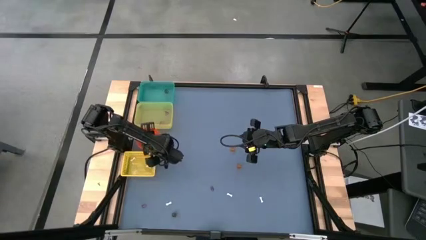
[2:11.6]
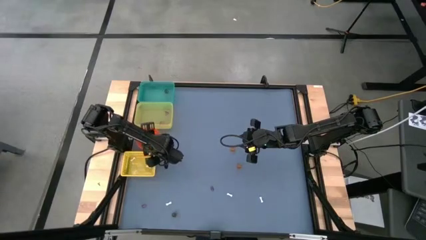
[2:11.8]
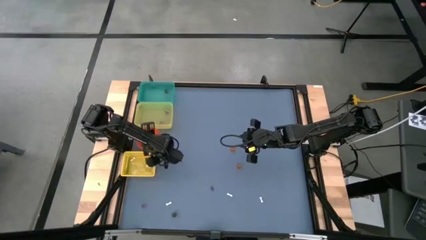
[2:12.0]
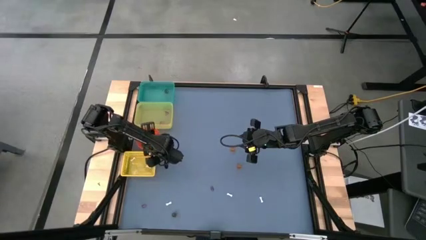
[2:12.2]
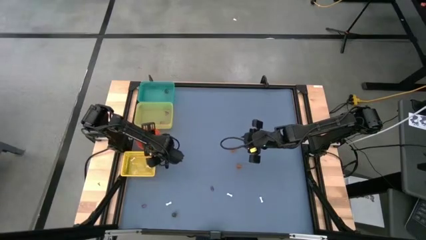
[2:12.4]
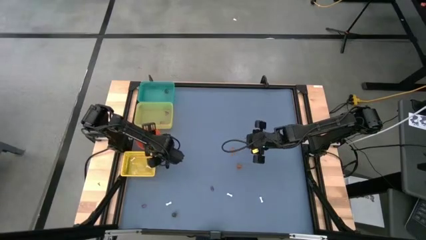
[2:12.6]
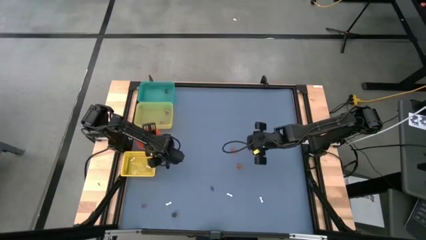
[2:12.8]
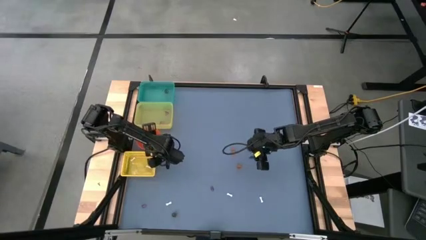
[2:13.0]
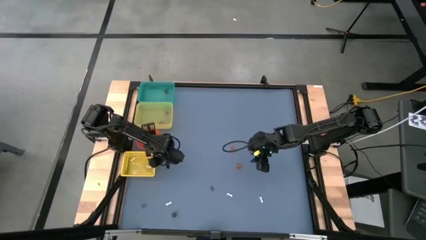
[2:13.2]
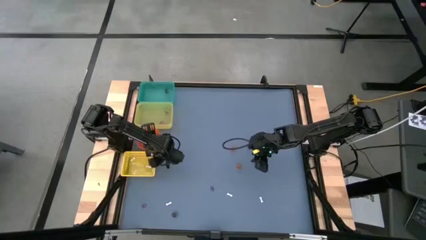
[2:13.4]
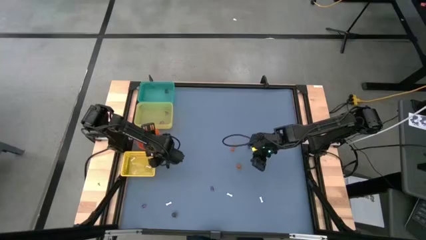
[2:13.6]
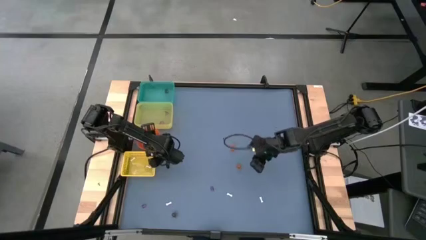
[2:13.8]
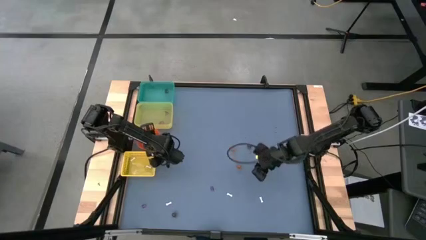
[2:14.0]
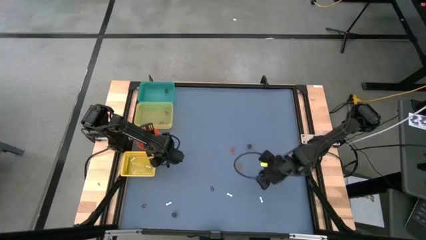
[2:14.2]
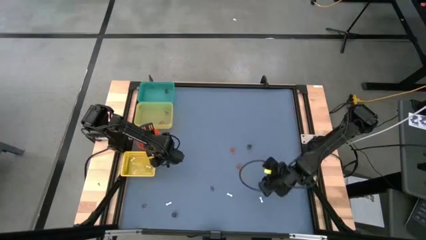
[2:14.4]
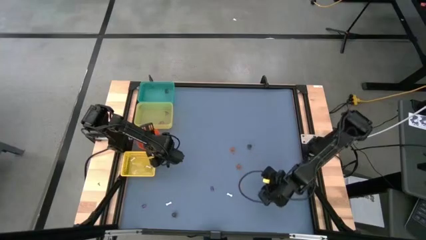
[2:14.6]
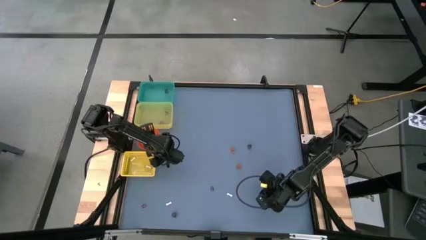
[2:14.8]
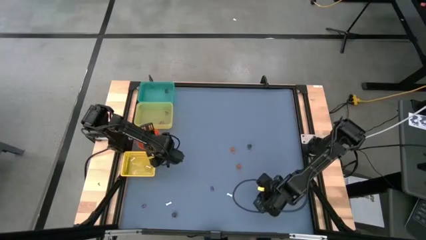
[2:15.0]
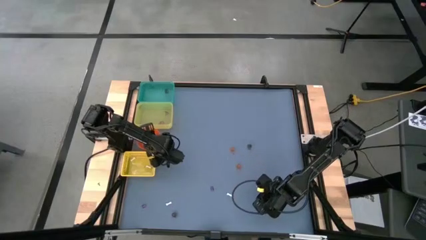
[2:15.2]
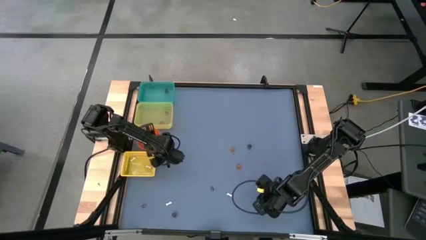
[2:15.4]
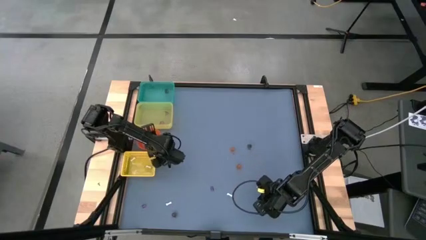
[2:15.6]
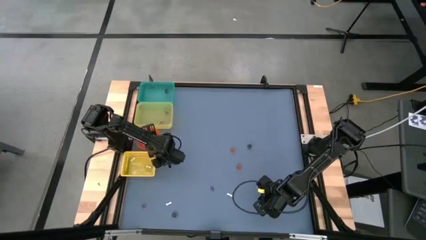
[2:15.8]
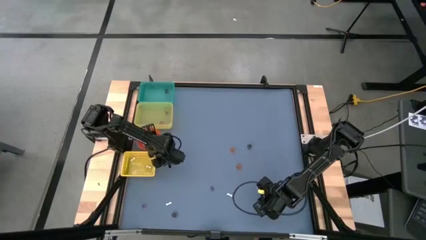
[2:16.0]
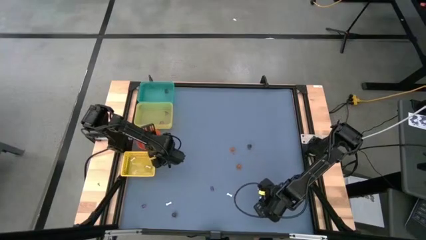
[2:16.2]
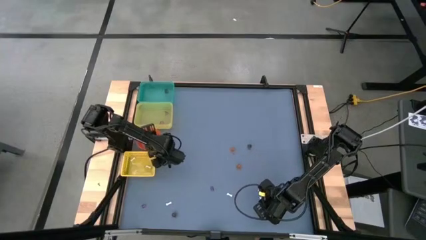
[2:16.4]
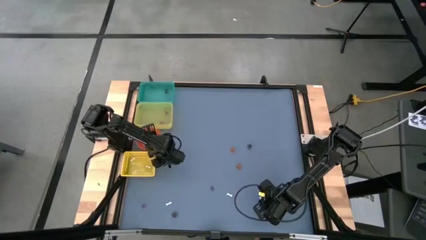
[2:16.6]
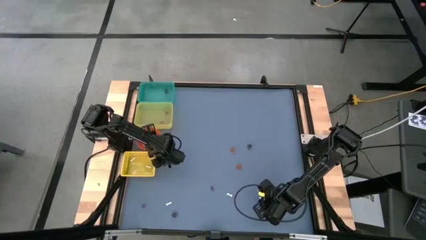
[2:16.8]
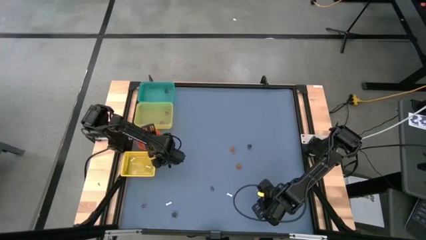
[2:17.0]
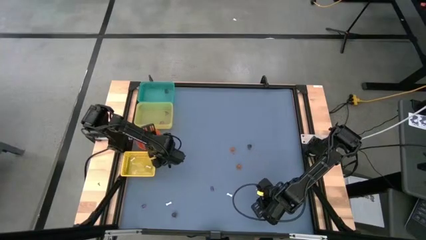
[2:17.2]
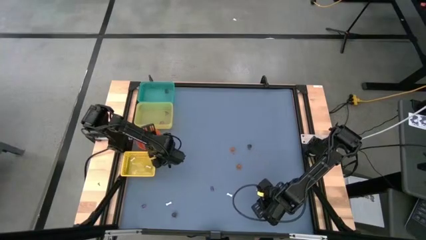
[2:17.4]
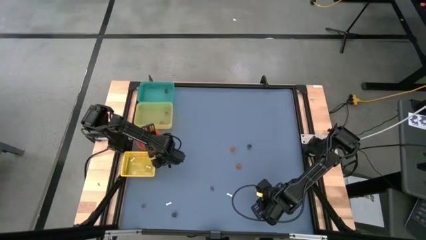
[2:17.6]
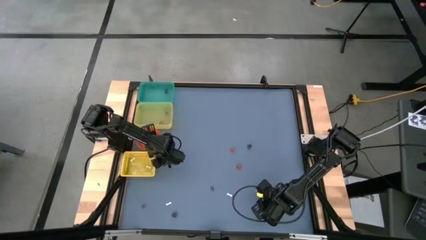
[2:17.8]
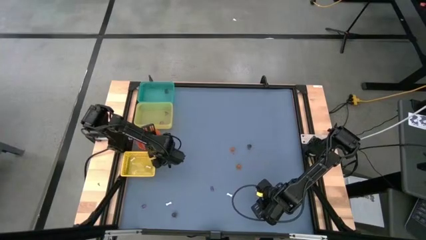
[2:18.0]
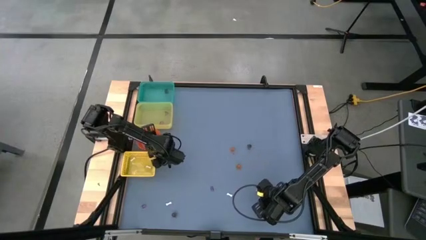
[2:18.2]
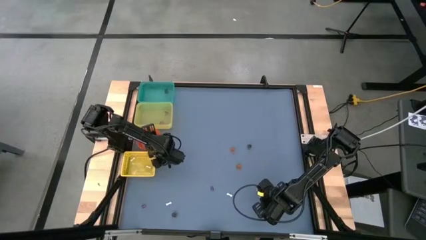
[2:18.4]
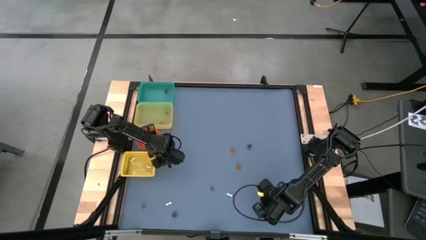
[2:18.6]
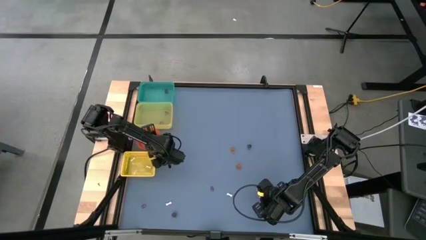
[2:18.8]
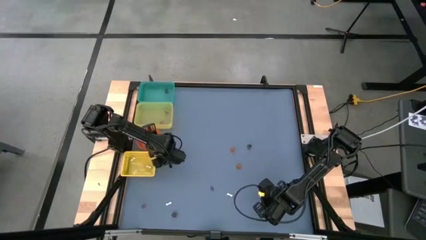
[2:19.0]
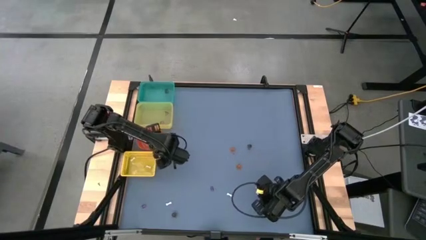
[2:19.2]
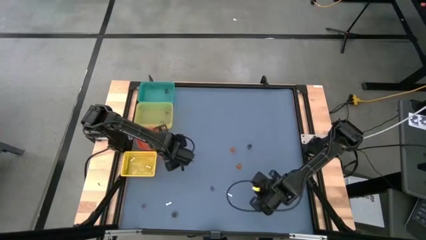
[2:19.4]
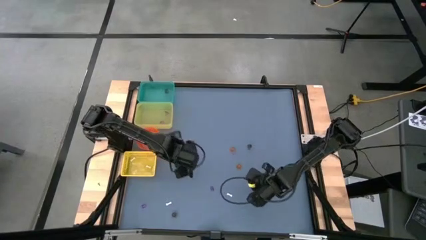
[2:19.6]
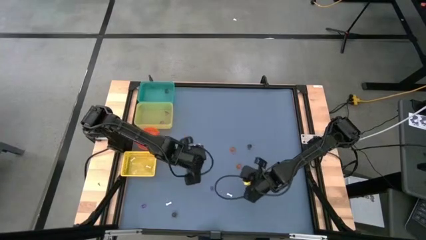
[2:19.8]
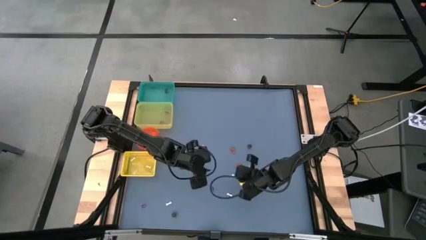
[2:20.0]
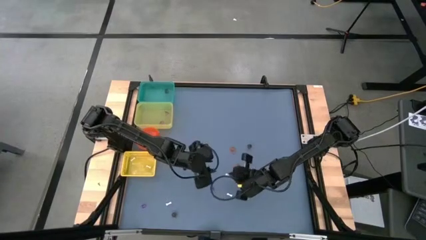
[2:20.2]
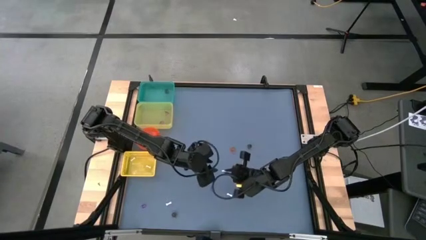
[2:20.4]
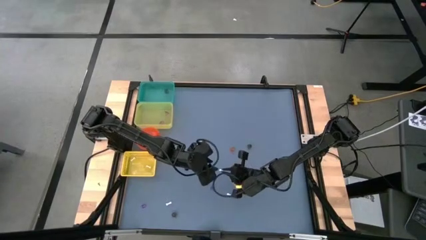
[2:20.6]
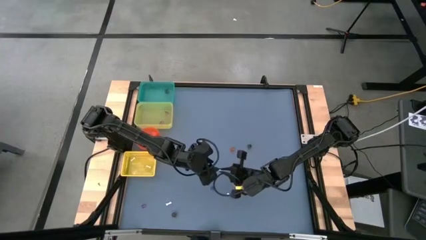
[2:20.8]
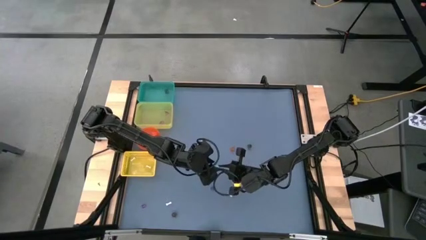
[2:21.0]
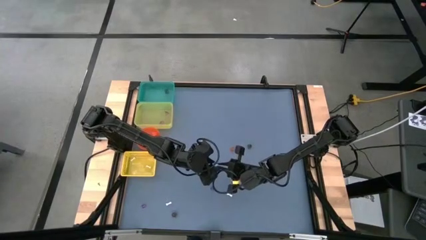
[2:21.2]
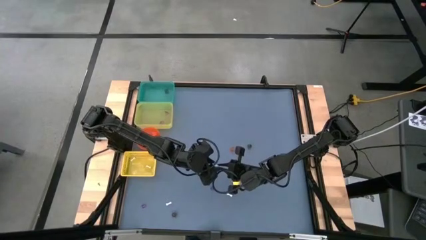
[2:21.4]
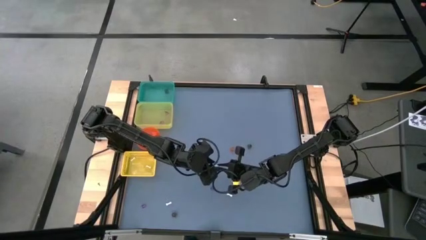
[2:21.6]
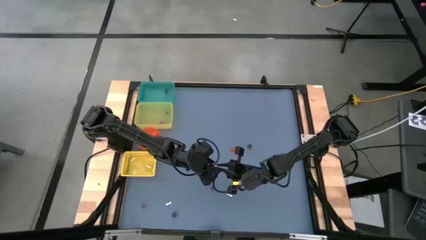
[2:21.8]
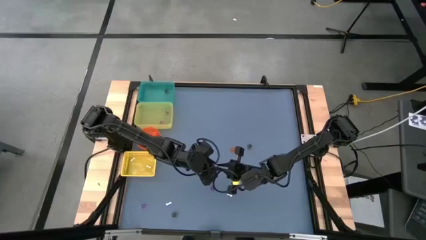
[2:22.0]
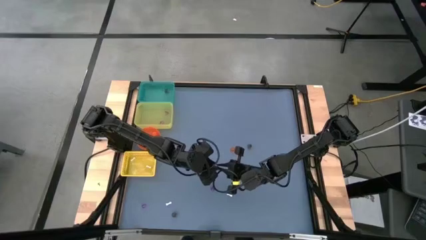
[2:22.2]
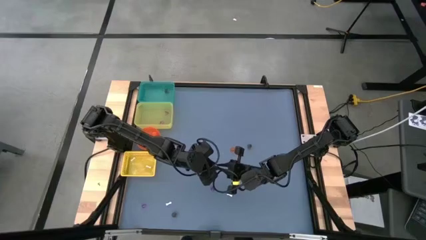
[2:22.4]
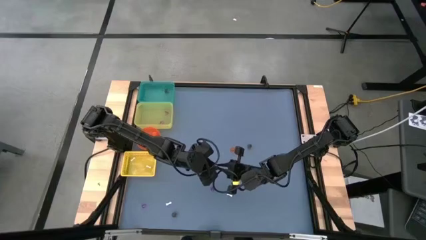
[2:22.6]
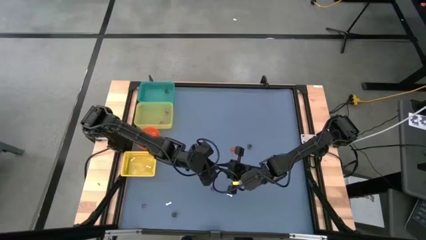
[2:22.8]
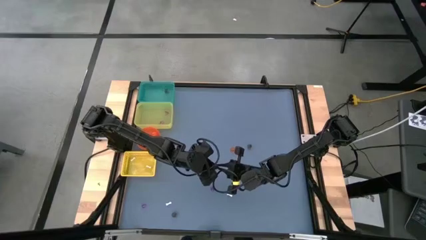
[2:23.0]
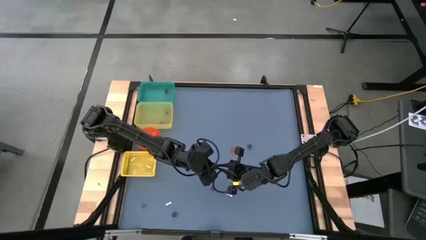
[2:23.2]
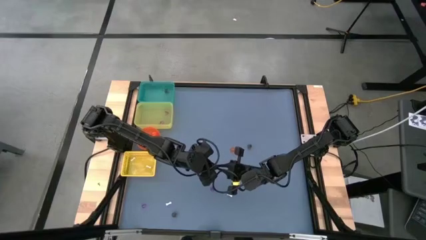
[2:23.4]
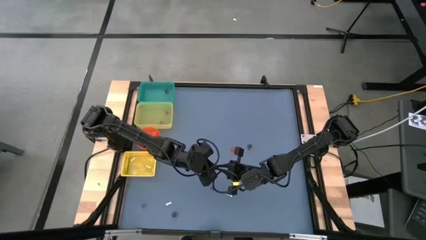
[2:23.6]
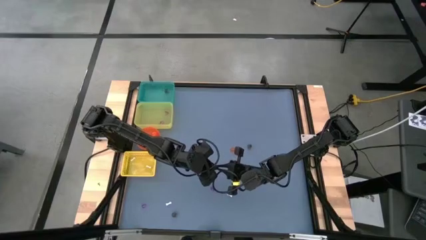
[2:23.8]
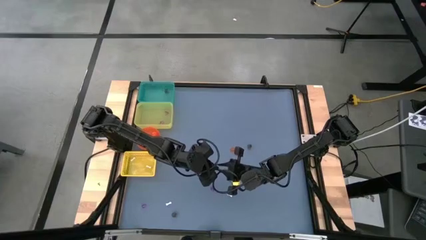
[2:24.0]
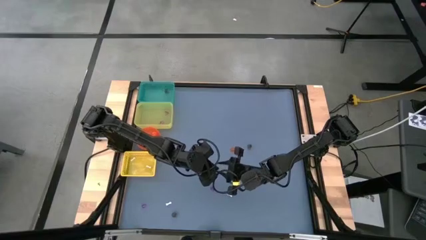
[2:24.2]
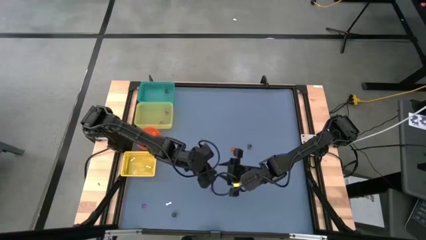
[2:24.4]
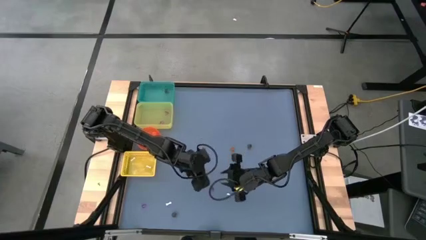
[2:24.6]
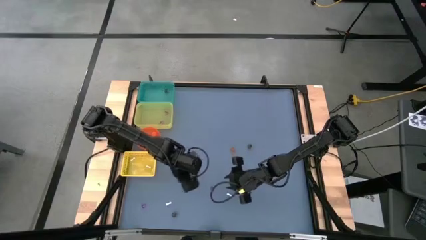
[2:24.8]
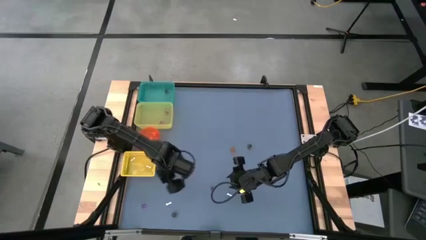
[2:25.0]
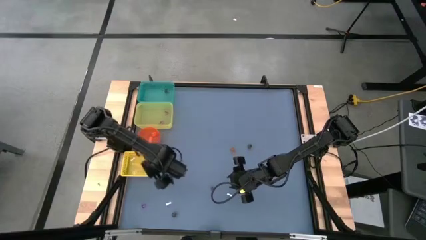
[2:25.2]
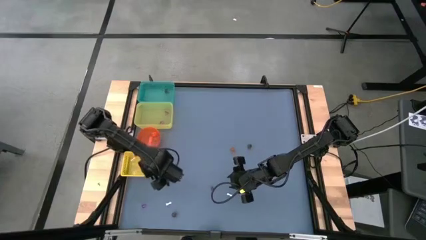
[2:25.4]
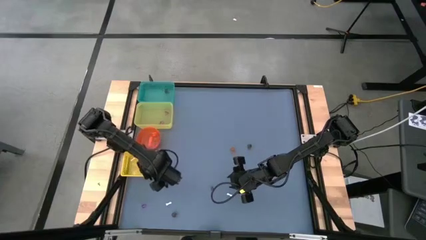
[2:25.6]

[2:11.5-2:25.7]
Task: Sort Halloween decoration
Put the right white bone toy into the yellow basket

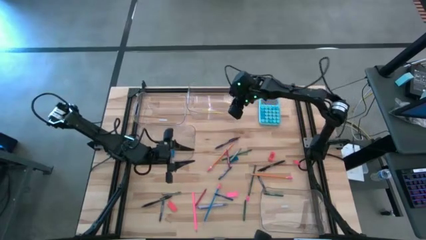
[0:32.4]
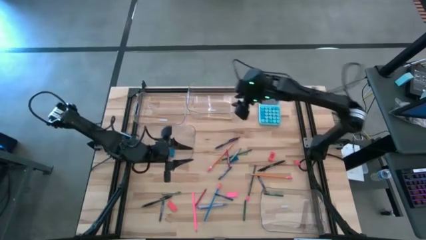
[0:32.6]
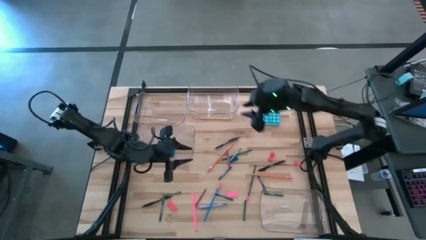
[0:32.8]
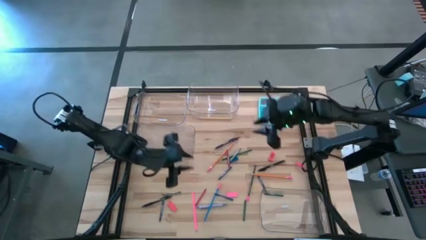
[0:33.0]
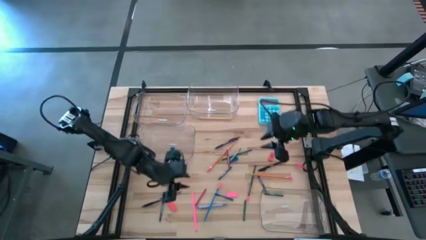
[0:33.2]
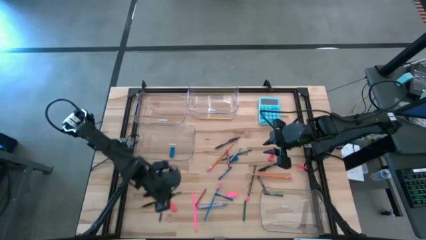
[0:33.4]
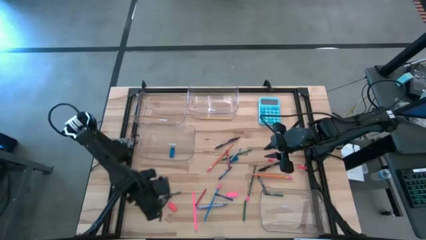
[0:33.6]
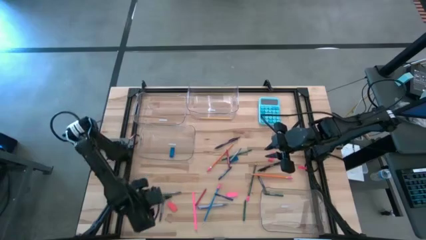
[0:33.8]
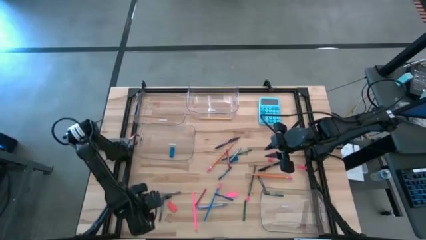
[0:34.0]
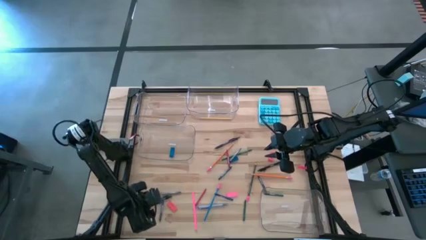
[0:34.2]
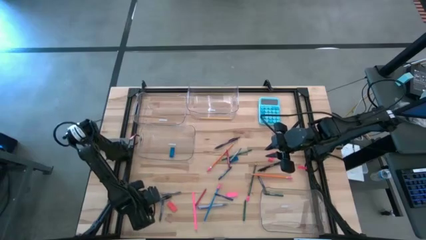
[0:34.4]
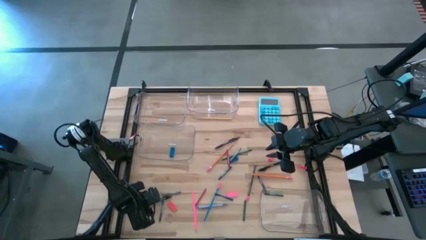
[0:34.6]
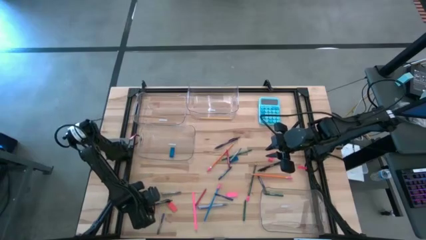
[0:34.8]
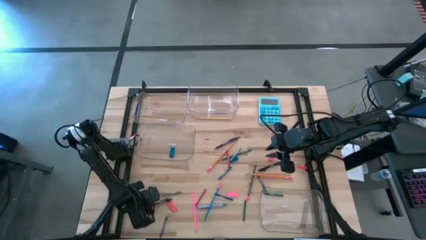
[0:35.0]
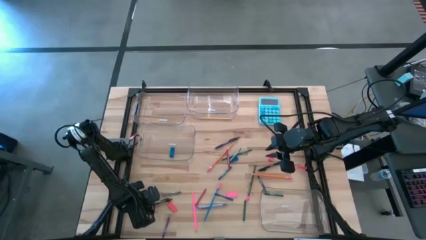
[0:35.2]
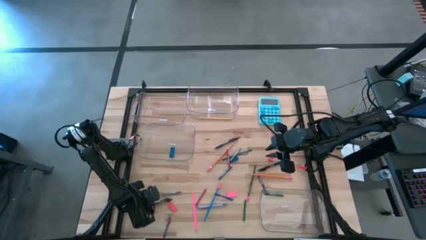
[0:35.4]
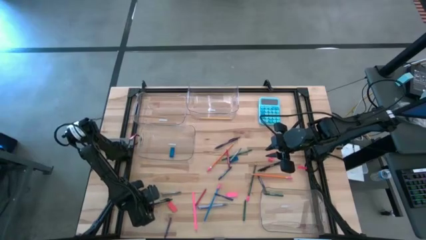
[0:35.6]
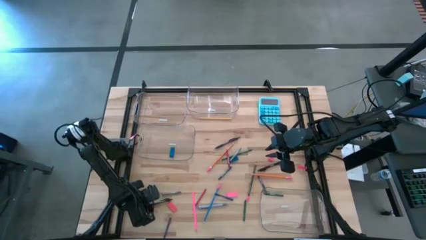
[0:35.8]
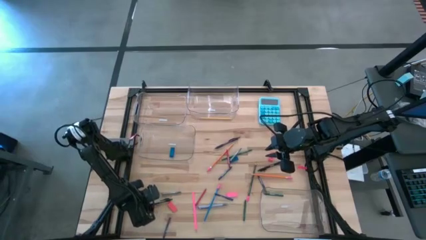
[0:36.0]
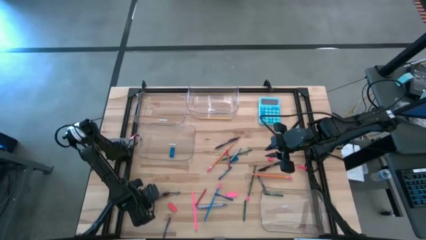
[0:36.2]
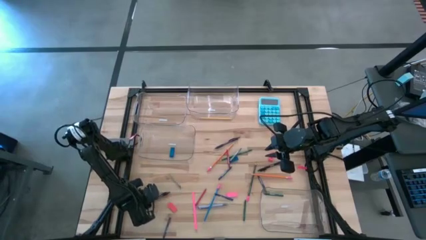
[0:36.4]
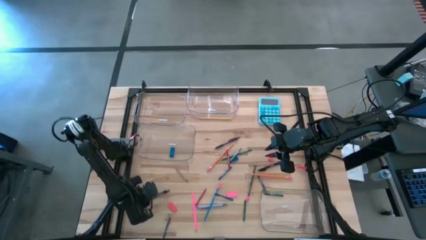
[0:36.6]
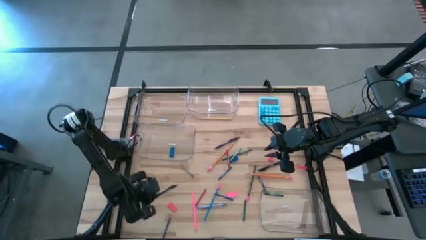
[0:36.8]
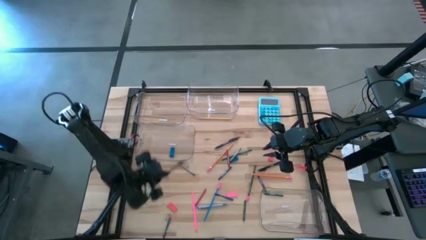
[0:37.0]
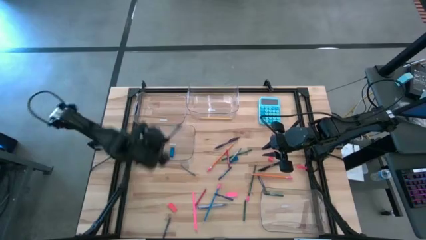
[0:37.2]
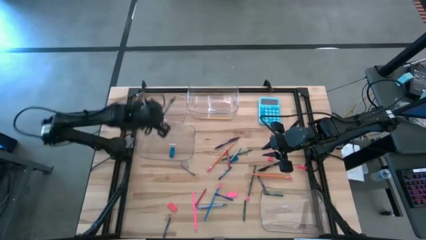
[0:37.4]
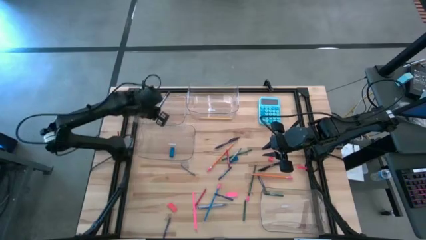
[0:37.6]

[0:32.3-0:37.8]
Task: Sort crayons/erasers/pens/pencils in bins
Put the black pen into the top left transparent bin
